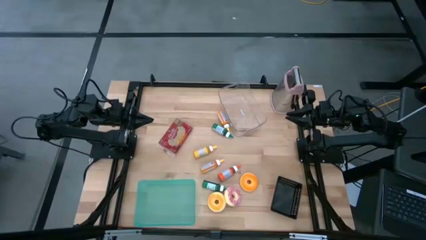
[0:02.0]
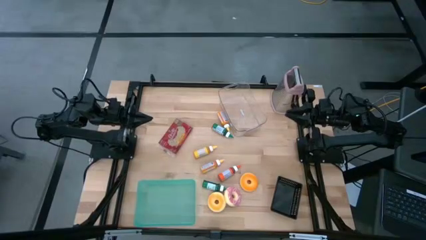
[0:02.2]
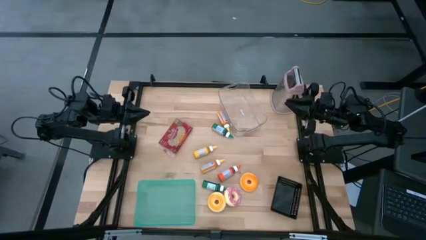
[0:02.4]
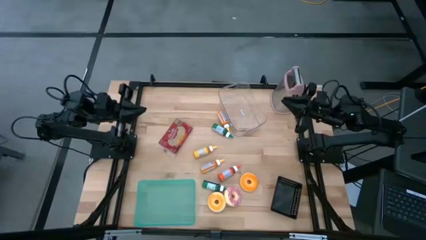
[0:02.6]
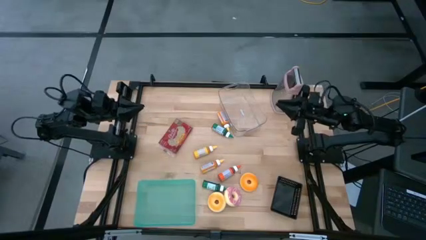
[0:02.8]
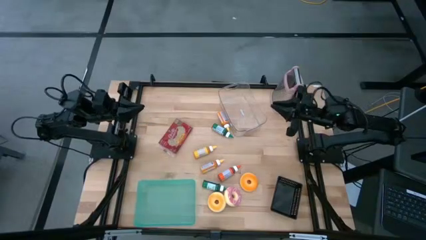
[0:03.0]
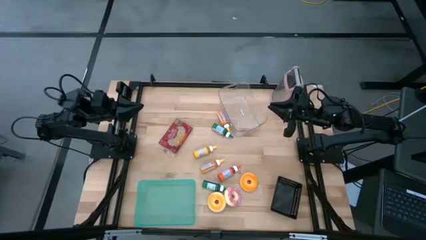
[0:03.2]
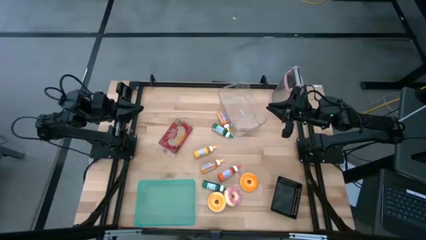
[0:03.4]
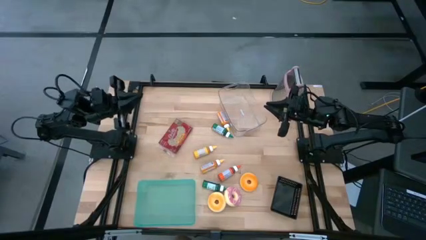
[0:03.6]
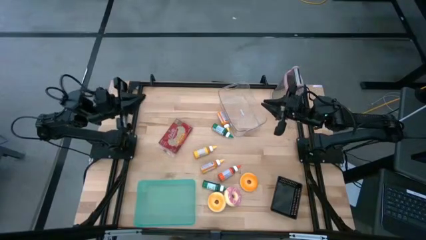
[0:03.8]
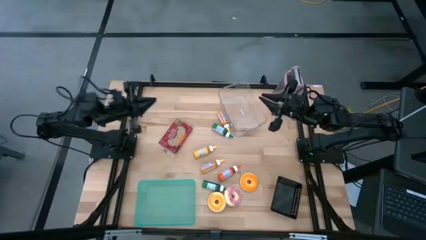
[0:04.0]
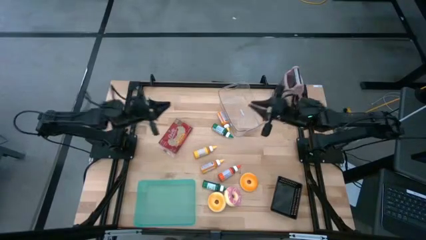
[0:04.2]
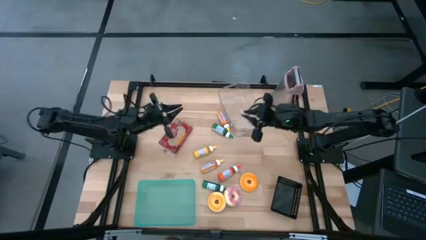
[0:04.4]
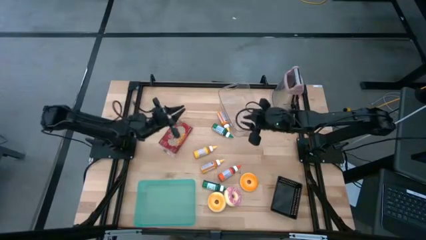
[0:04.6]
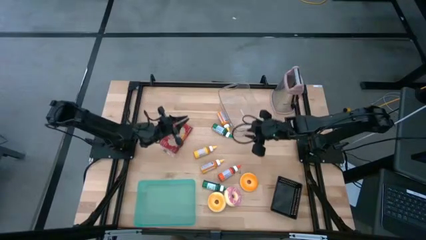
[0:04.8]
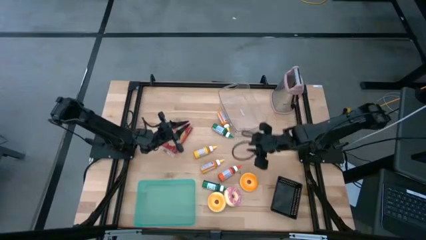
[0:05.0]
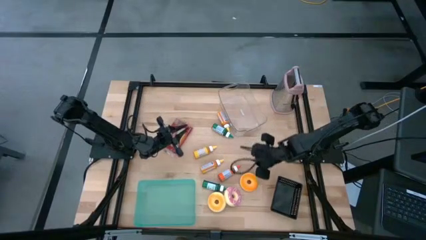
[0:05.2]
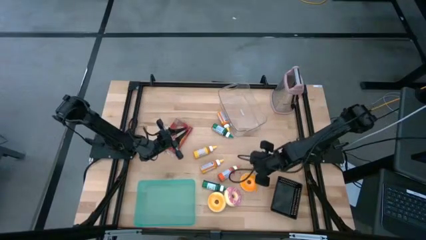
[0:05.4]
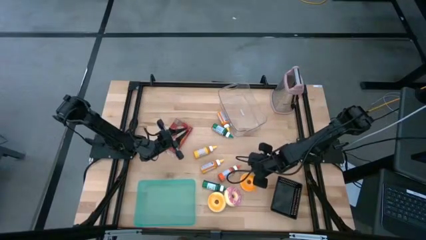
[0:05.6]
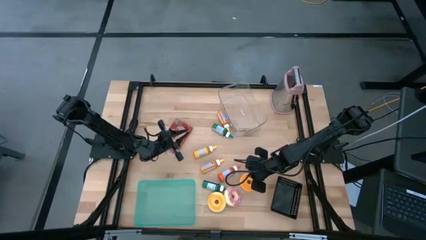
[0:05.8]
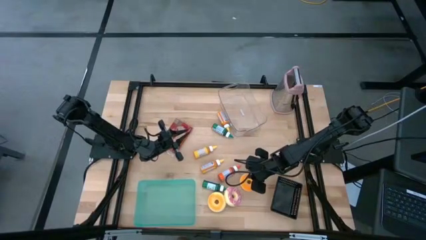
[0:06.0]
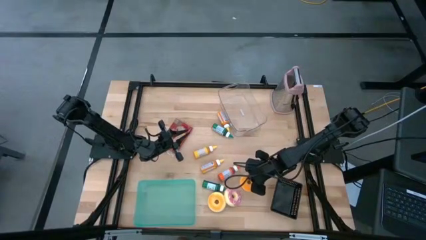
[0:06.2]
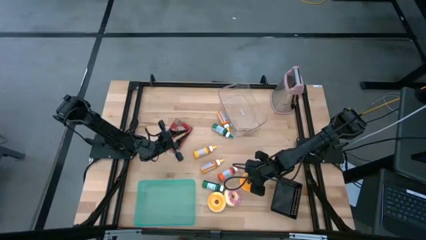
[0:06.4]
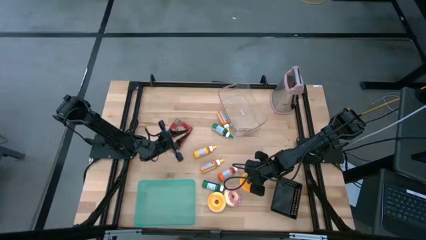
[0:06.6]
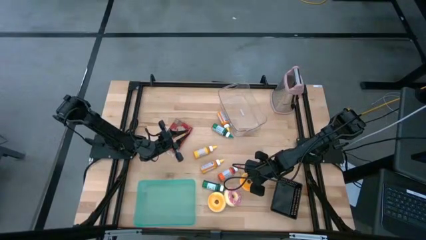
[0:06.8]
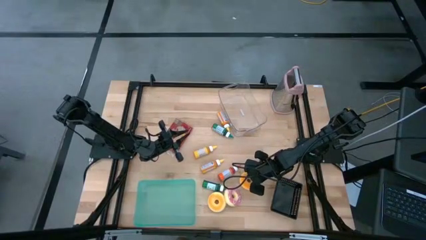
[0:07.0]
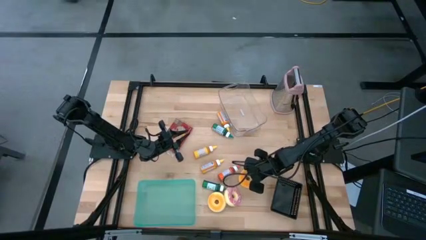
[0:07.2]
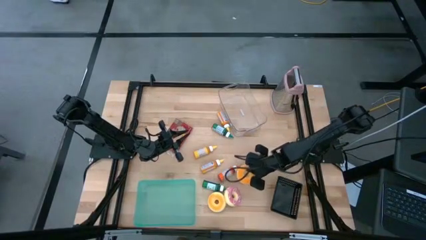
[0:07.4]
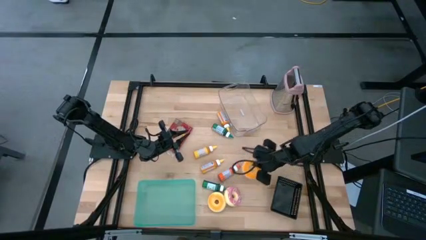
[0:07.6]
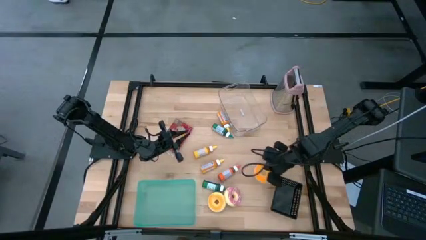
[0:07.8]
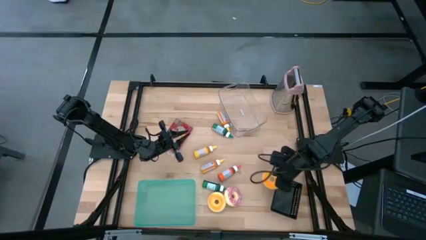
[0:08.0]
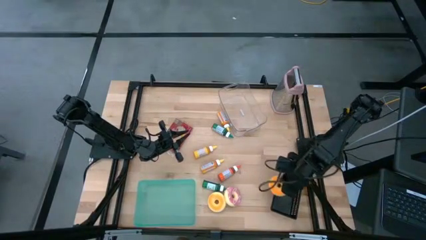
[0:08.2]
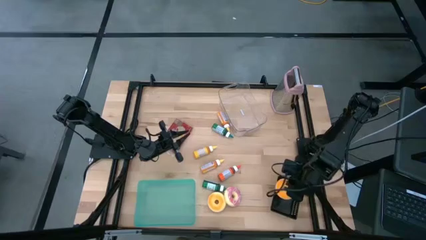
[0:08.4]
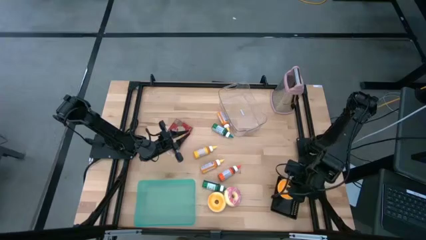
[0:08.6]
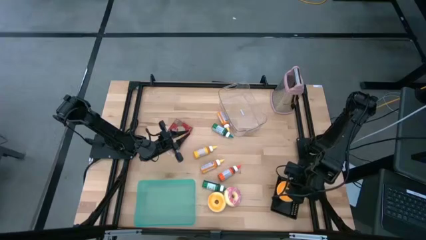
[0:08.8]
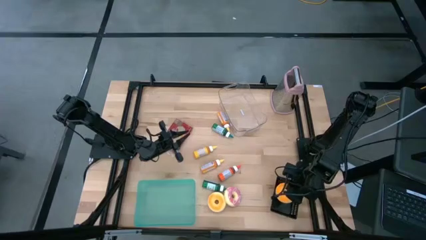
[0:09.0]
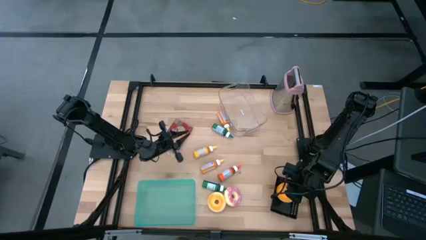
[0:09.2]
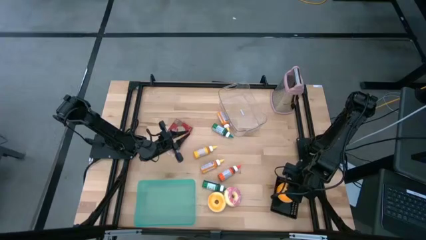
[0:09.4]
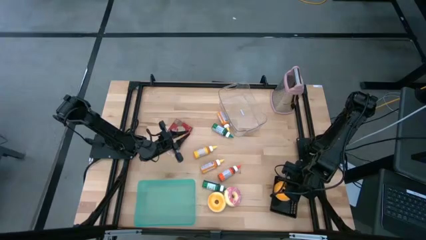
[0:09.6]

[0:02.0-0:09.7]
Task: Pick & Place Food Item
Put the orange donut into the black basket

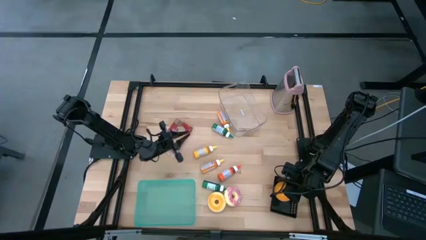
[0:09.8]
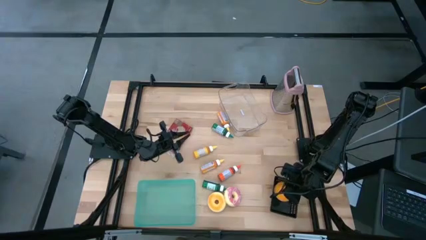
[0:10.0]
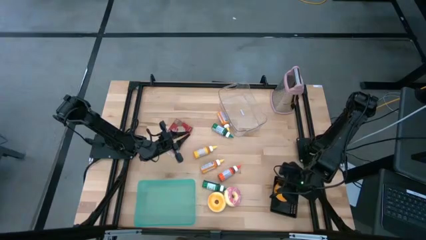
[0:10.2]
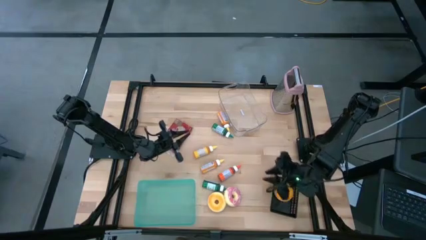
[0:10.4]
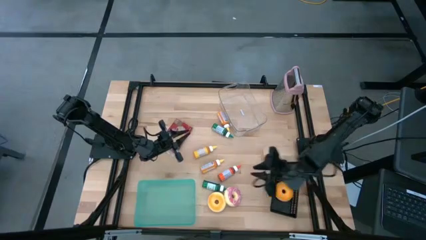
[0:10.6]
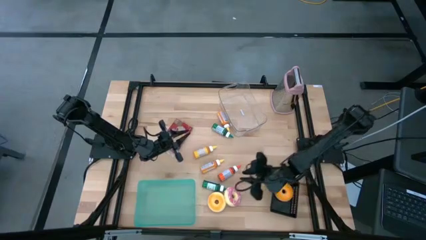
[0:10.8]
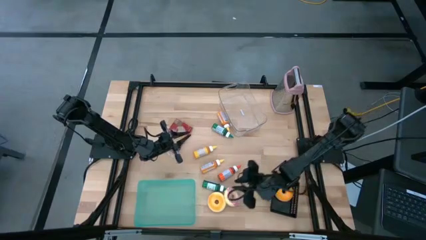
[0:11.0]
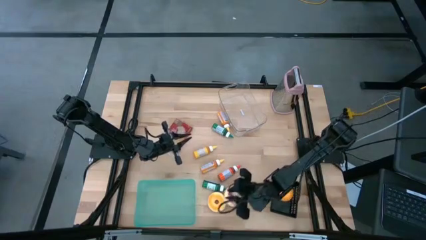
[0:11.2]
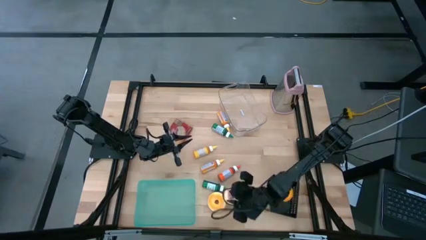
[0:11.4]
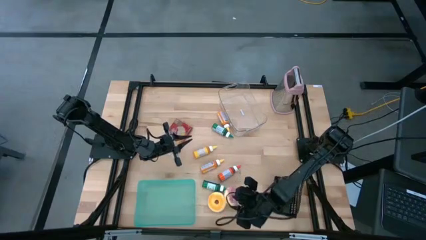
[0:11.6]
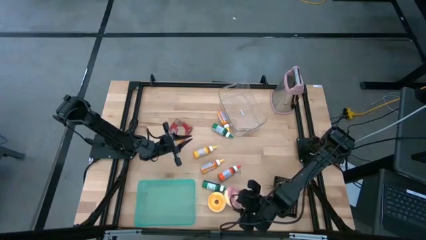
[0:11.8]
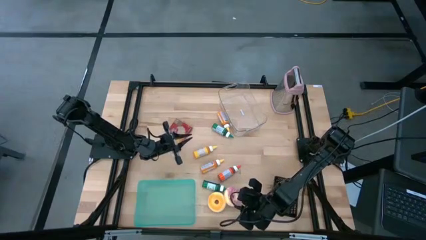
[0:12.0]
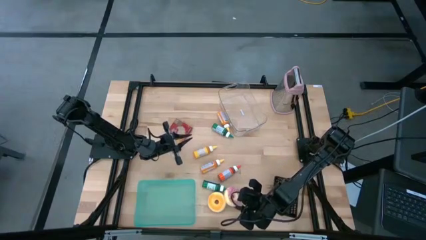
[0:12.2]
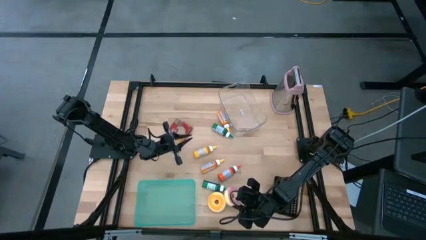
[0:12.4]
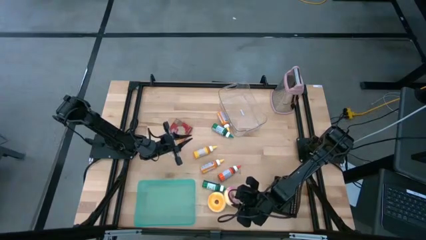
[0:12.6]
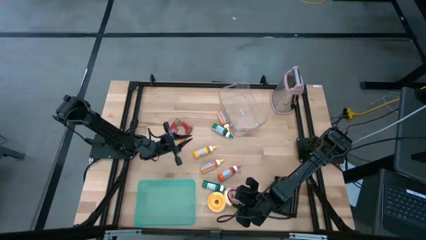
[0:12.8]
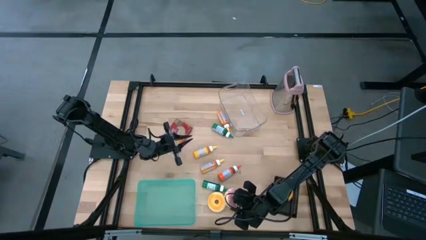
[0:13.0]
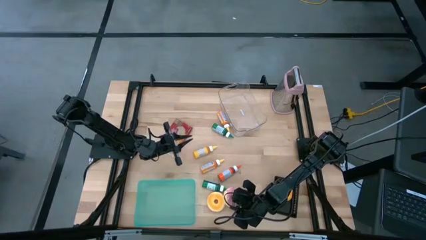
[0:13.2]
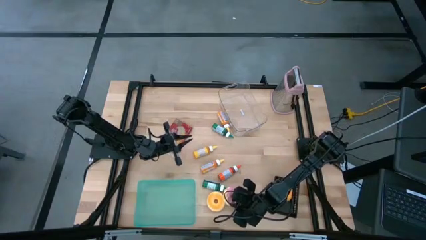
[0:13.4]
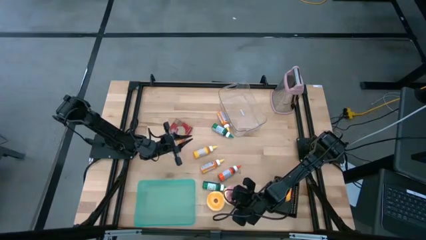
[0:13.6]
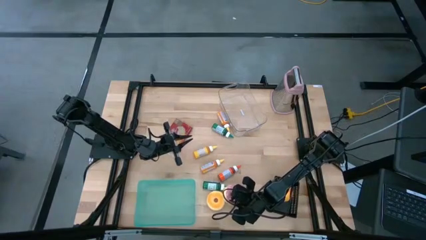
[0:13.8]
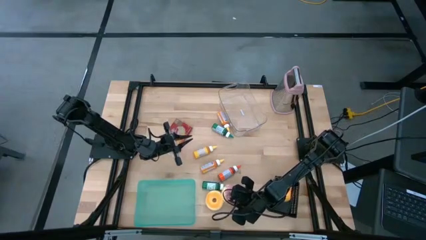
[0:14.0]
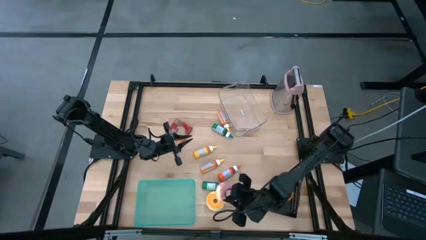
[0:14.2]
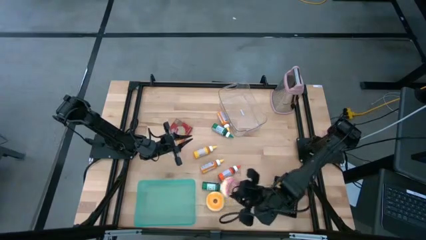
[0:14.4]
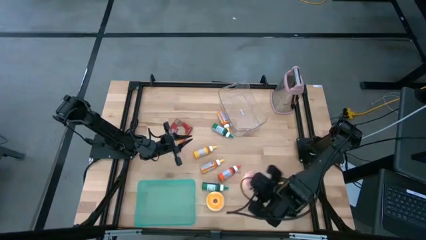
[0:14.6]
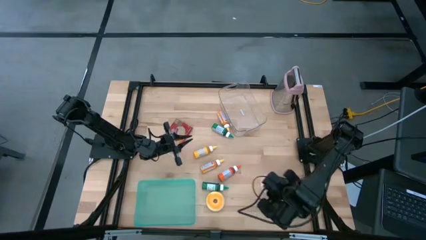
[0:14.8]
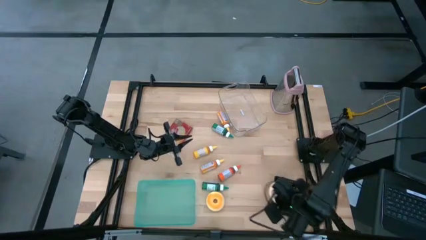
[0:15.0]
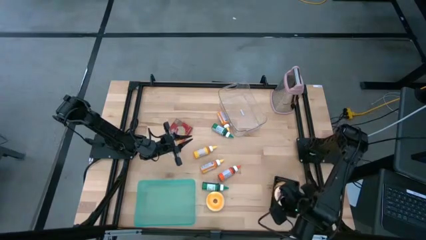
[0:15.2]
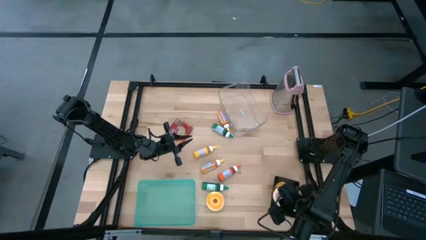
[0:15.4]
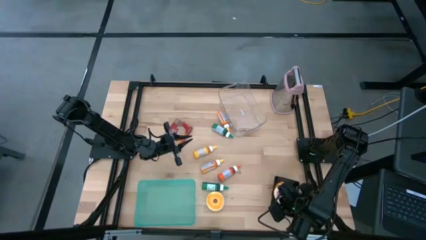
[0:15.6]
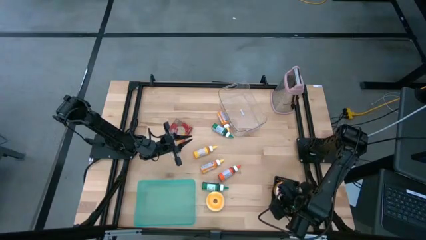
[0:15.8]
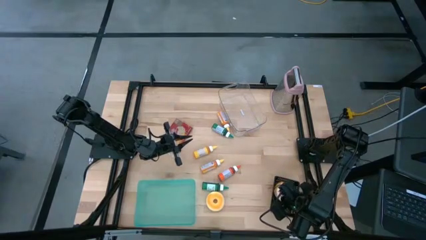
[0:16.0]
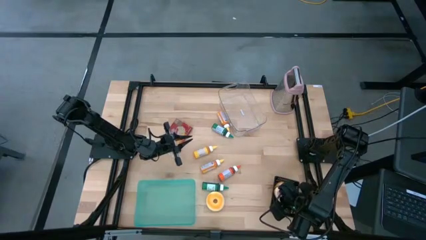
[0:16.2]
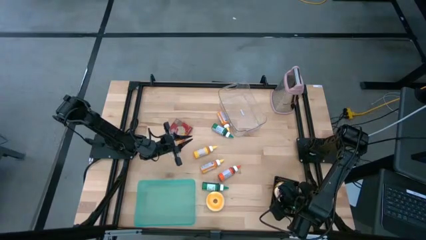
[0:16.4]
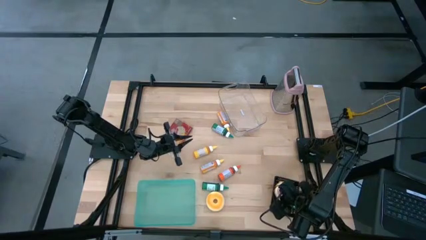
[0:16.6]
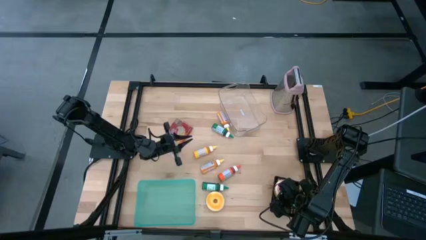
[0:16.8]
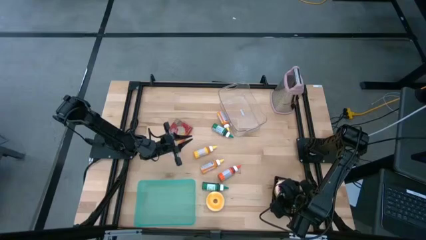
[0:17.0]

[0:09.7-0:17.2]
Stack the pink donut on top of the orange donut in the black basket

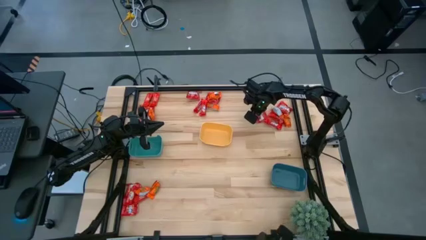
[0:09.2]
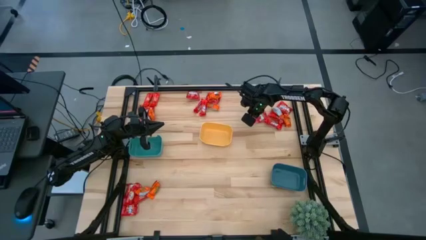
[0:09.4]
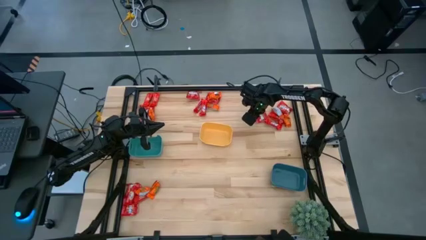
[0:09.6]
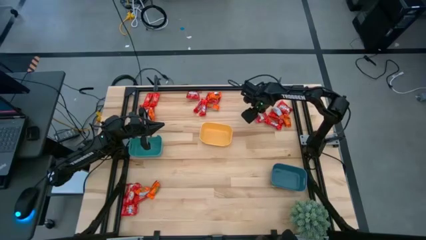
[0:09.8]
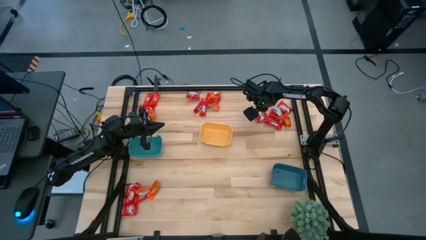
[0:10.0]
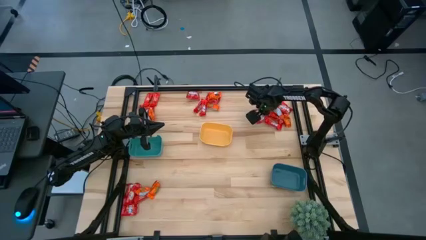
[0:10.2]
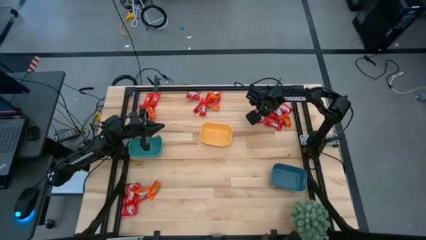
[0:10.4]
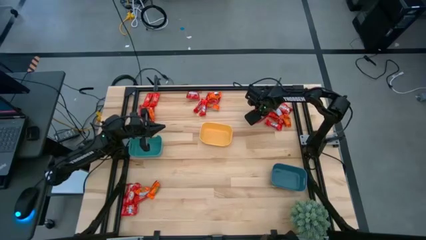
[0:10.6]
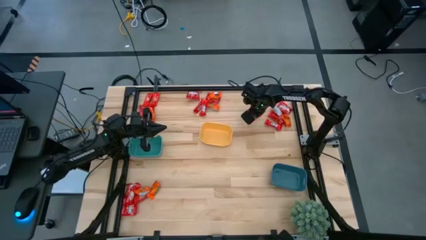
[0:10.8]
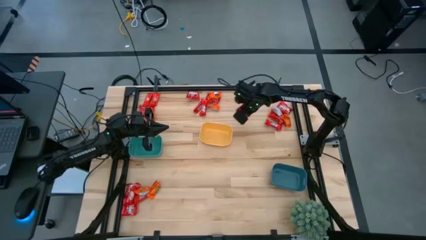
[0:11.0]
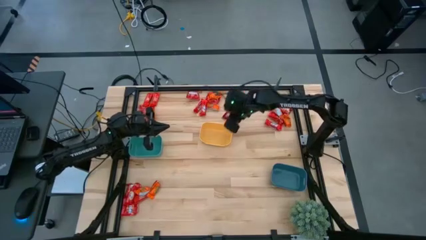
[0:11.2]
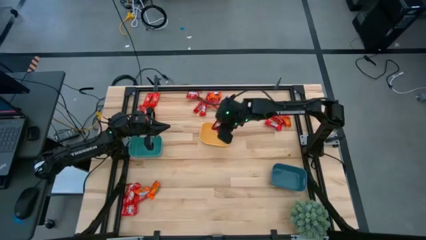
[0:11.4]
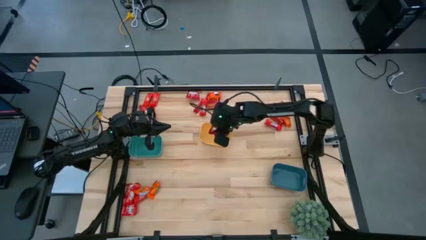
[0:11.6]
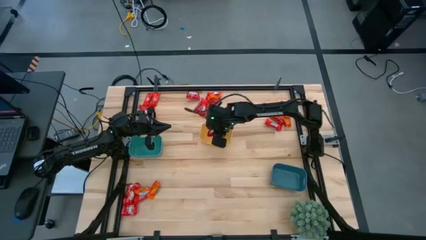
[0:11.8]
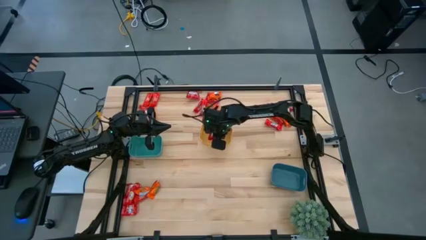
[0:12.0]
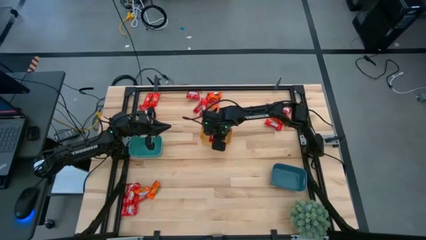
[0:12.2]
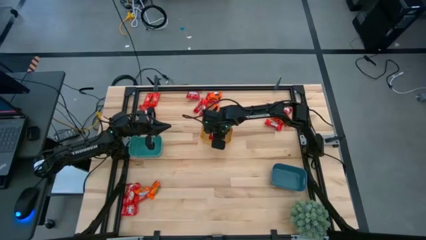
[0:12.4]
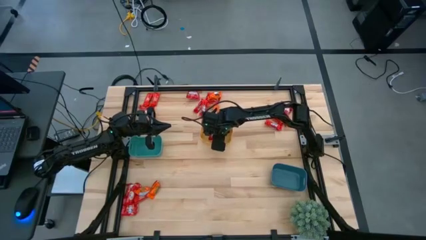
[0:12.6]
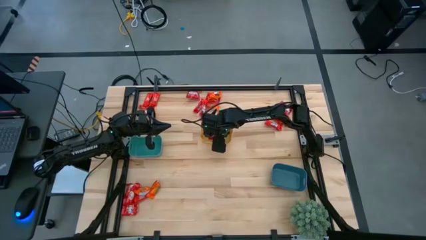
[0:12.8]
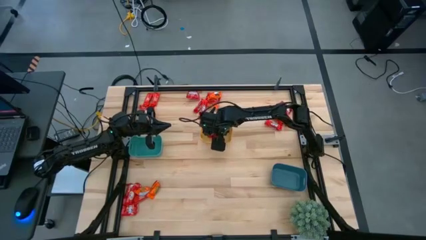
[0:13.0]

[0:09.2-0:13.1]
Task: Sort candy
Put the red candy into the yellow bin
